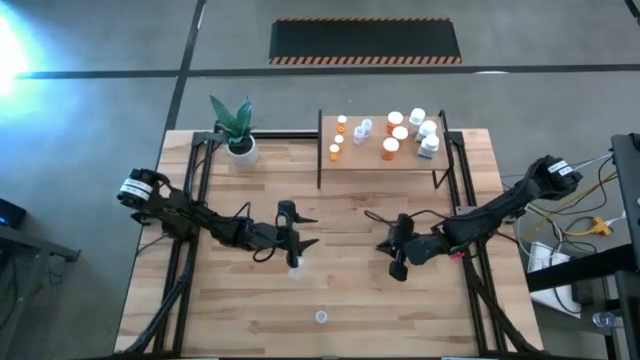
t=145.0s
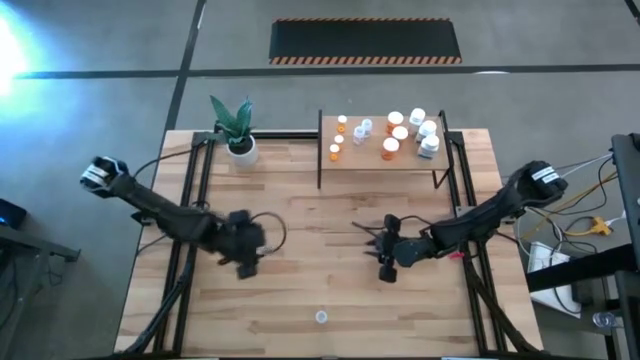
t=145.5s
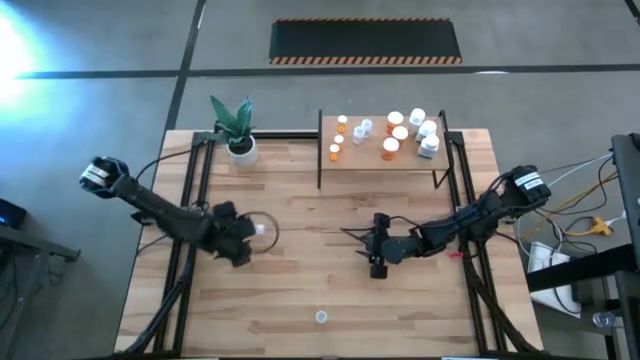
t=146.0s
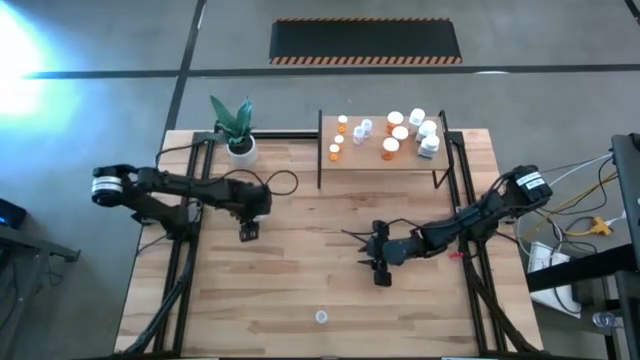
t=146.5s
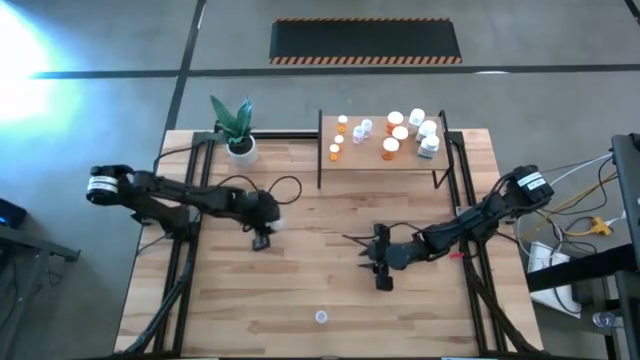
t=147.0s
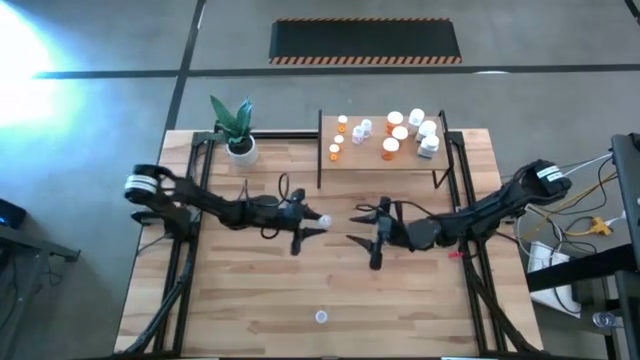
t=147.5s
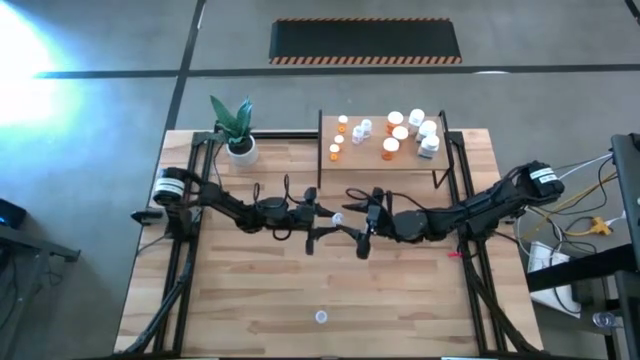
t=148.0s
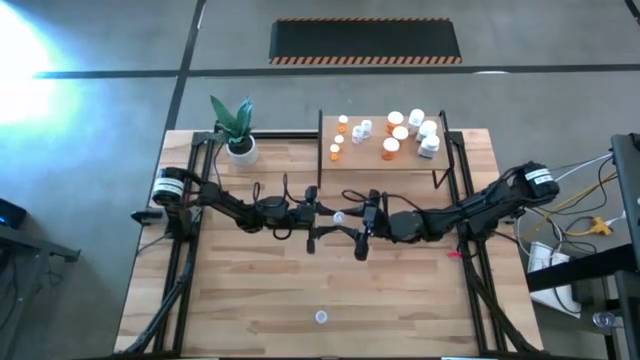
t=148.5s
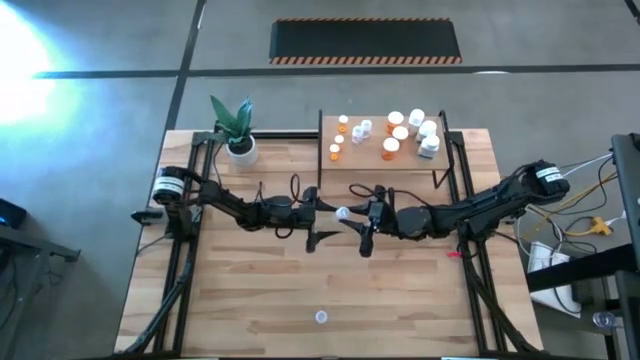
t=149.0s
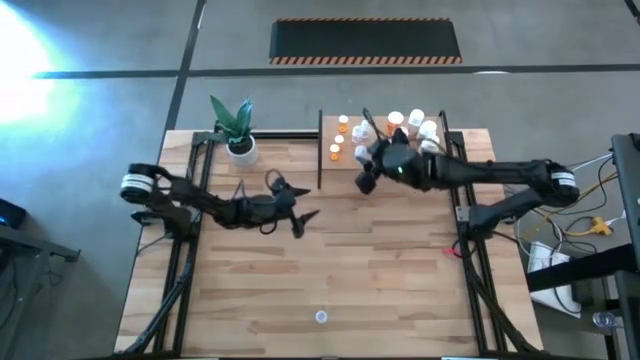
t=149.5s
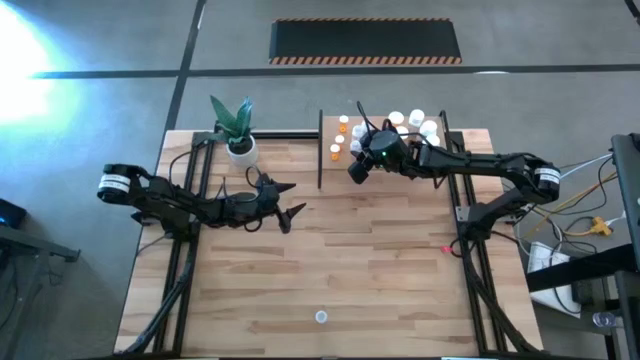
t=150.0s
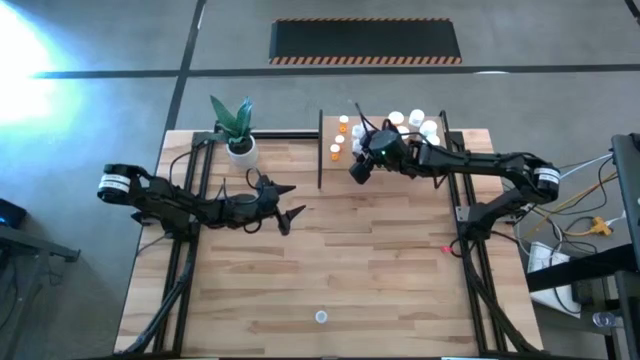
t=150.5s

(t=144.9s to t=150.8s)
Task: Pick and place medicine bottles onto shelf by color
Put the transparent pill bottle on the shelf aligned with the other transparent pill bottles

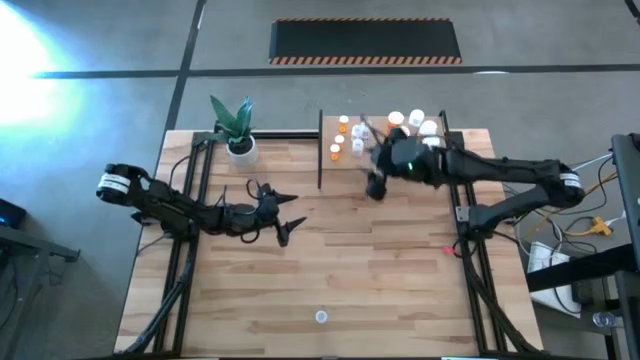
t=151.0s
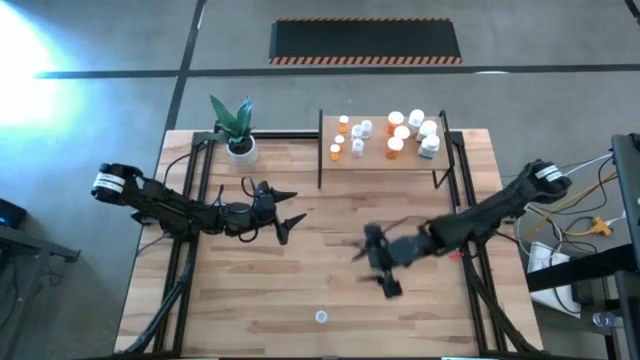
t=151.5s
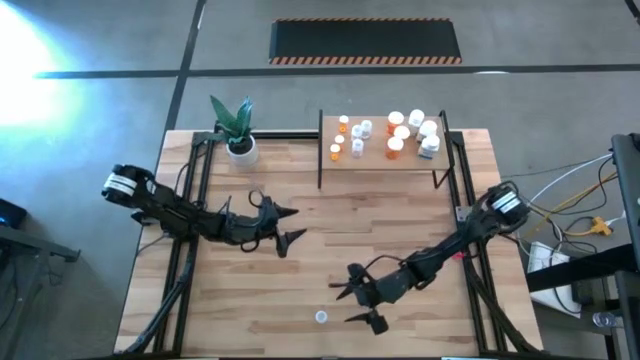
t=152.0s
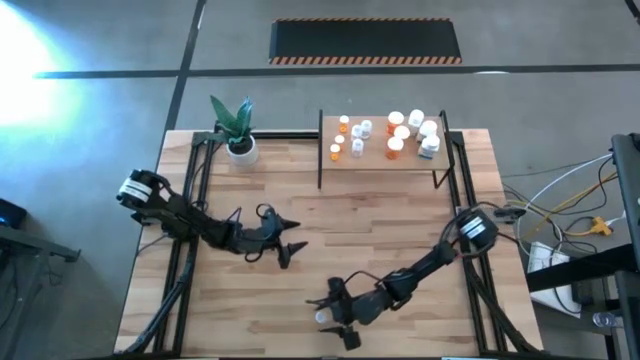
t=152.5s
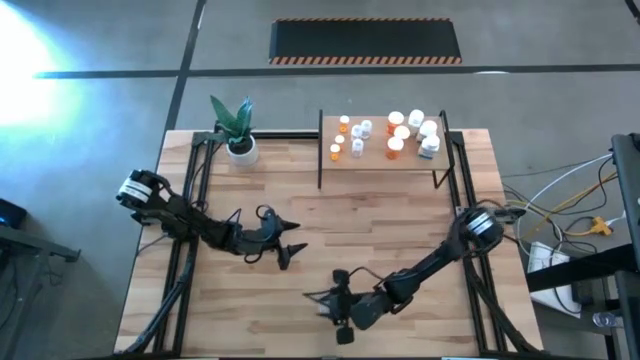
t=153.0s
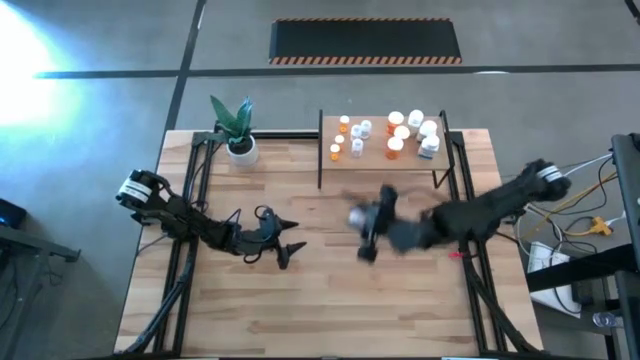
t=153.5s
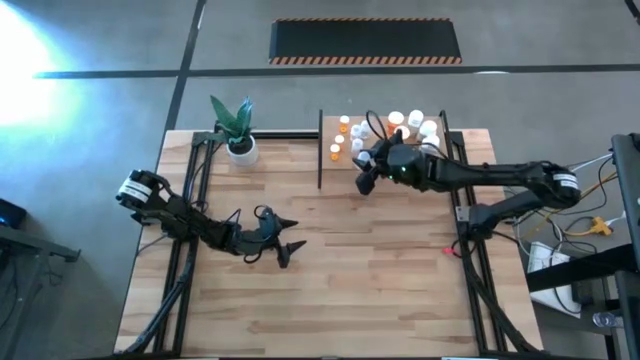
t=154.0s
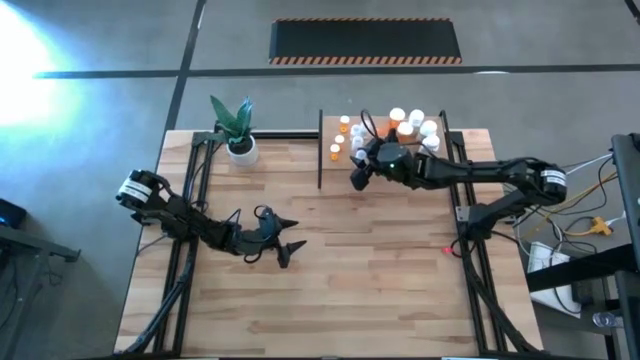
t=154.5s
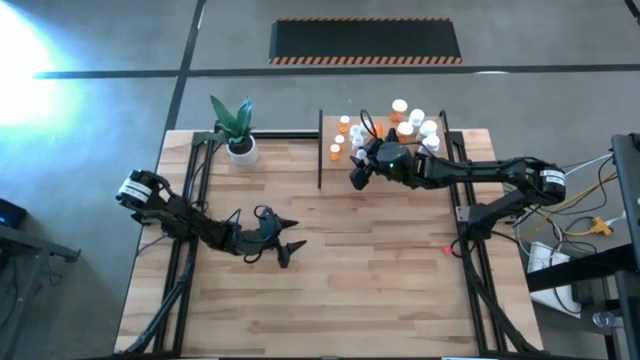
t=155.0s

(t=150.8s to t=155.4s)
Put the transparent pill bottle on the shelf aligned with the other transparent pill bottles

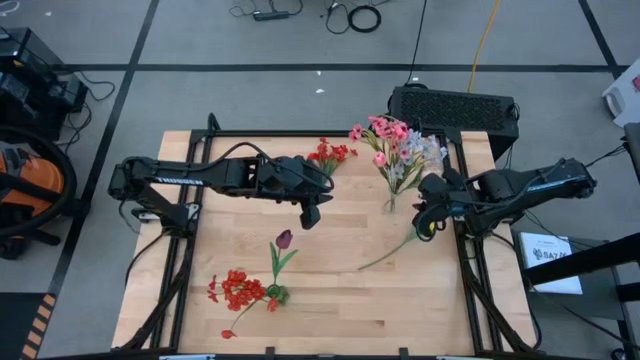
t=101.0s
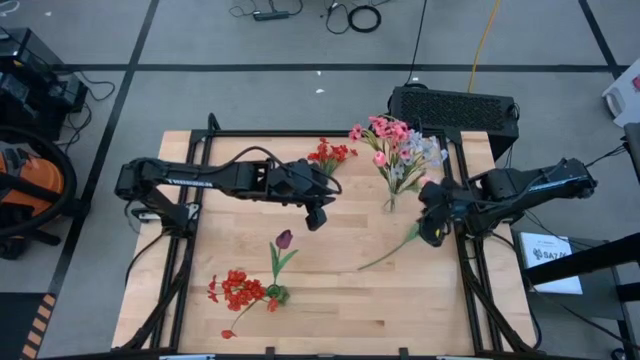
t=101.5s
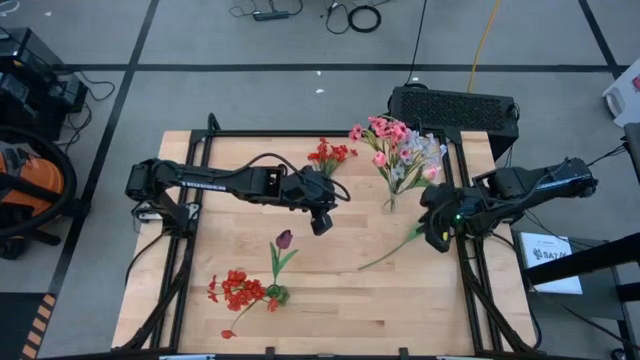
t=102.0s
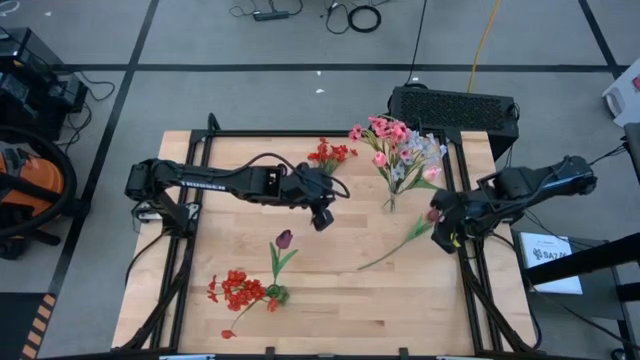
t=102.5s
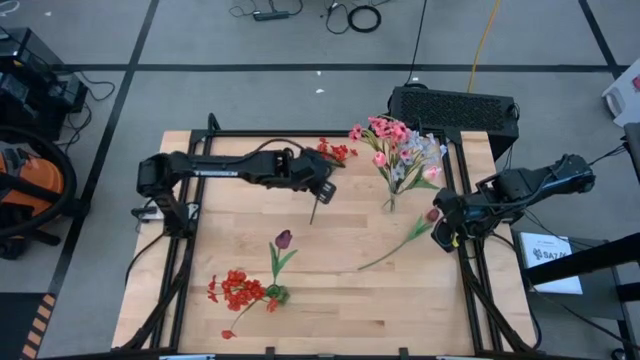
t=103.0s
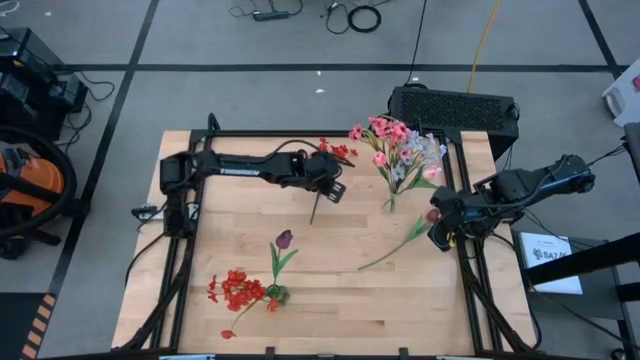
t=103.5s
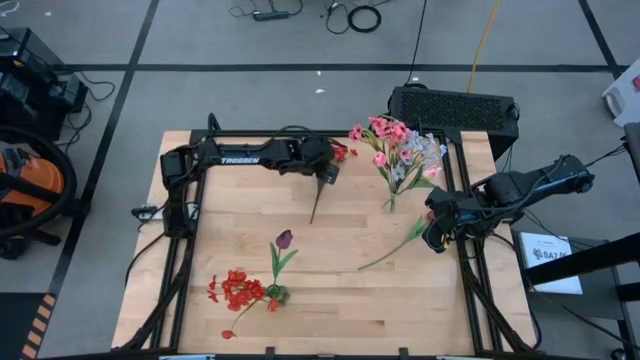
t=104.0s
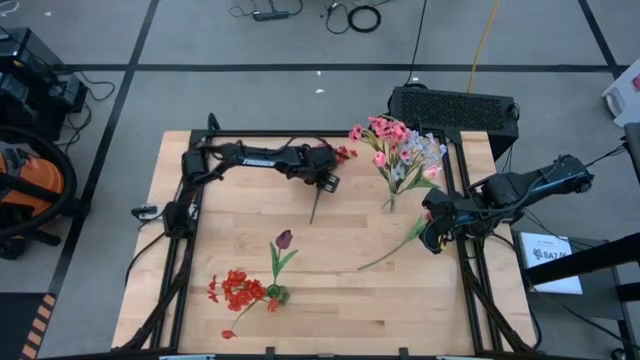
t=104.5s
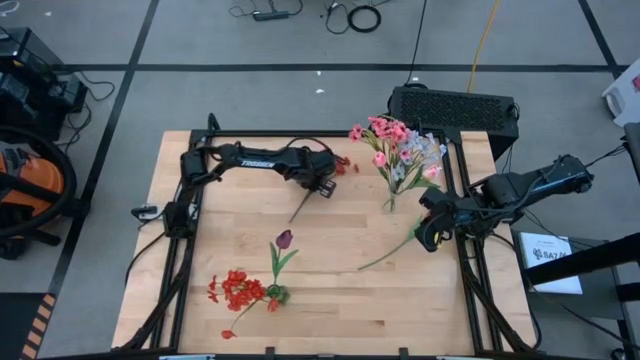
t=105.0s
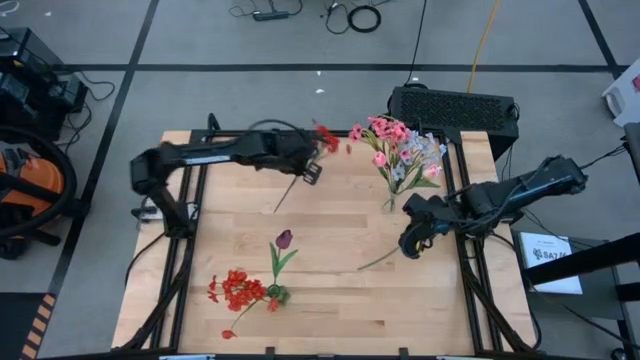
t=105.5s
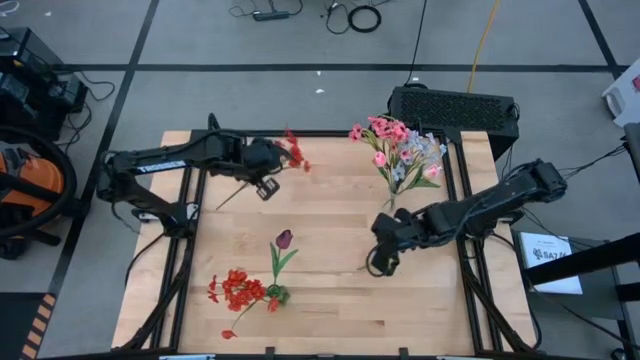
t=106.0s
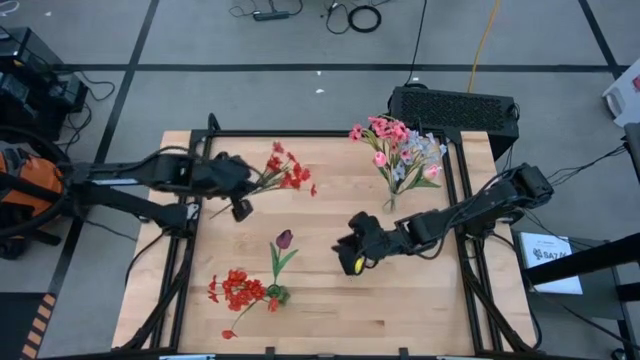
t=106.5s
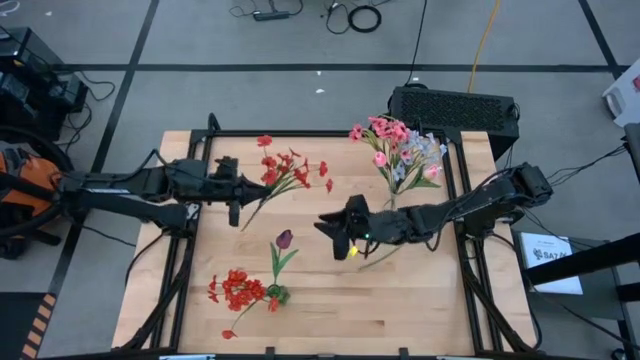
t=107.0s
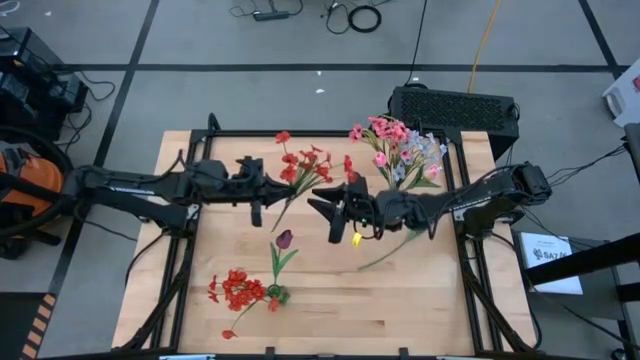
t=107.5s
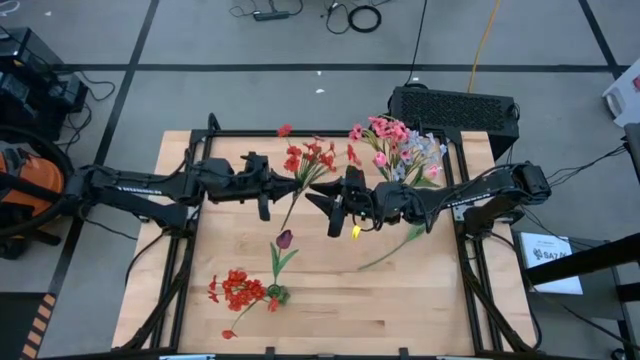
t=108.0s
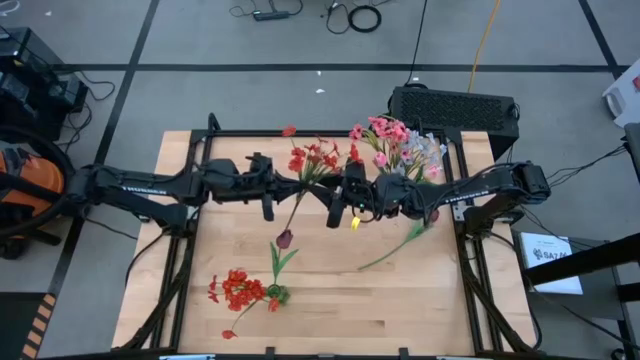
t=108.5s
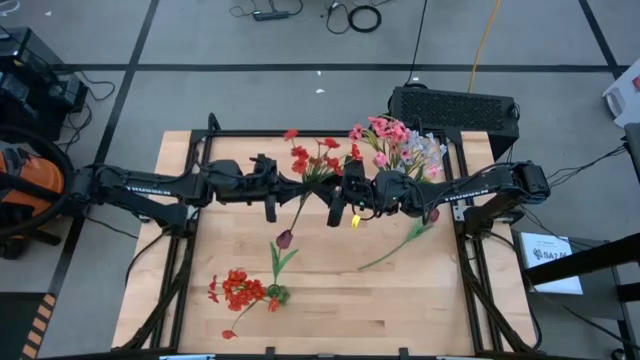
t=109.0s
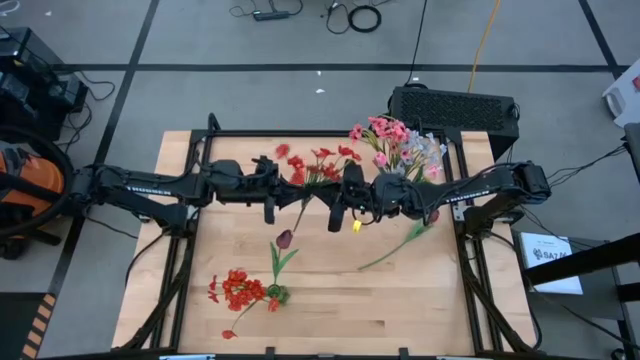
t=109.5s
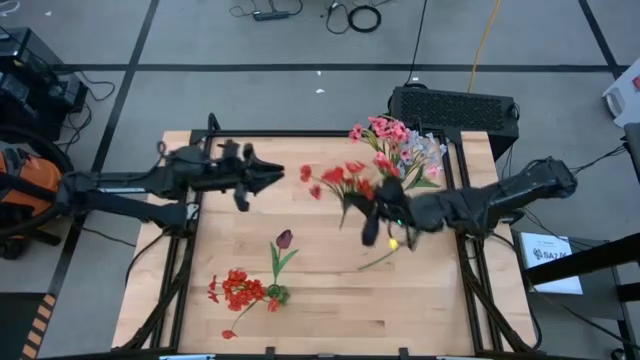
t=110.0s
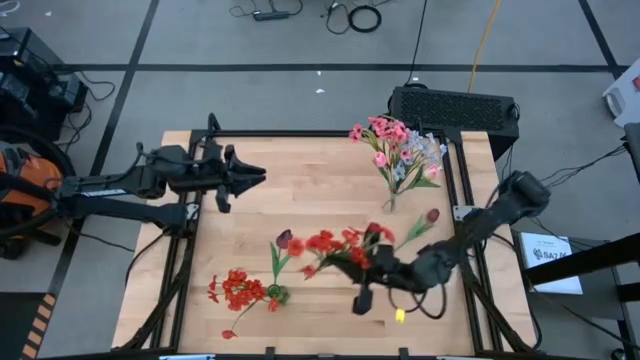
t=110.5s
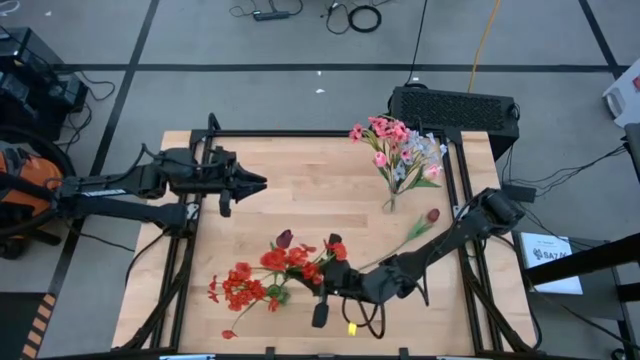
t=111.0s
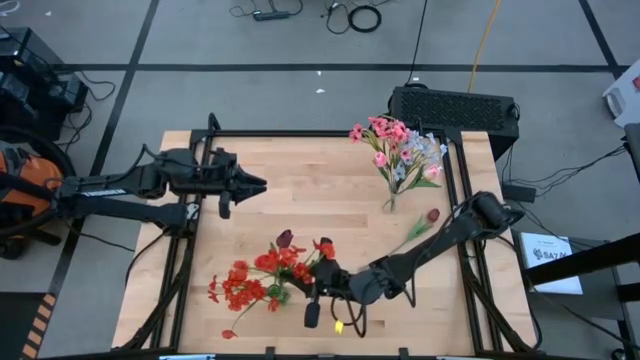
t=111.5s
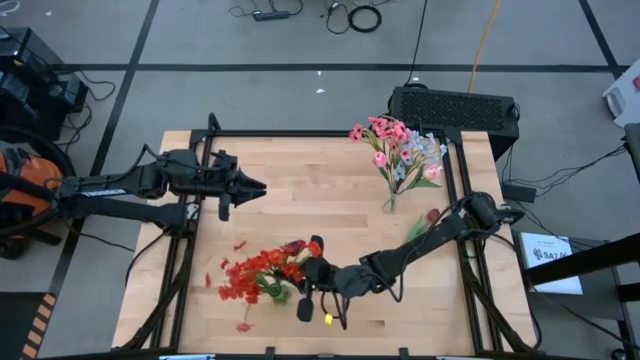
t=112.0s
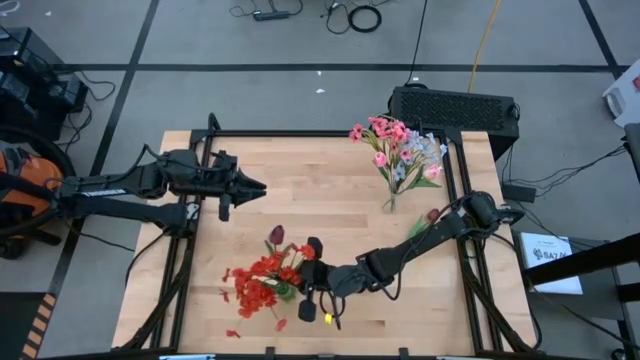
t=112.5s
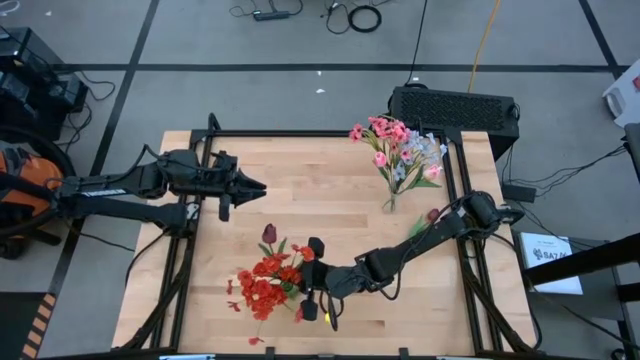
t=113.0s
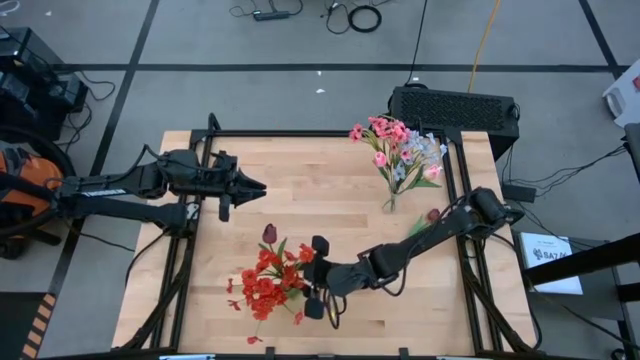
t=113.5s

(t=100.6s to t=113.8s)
Task: Sort flowers into vase by color
Put the red flowers into the green vase
